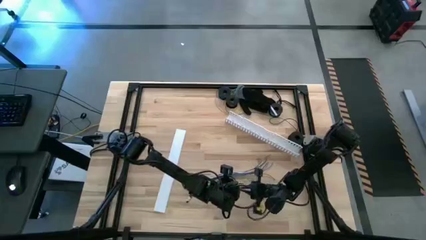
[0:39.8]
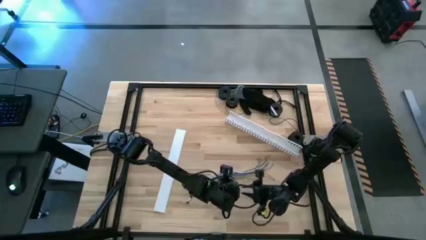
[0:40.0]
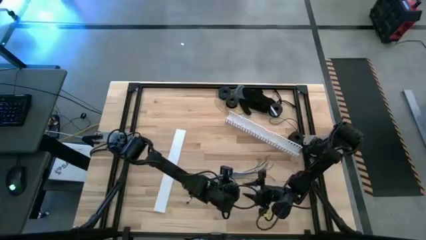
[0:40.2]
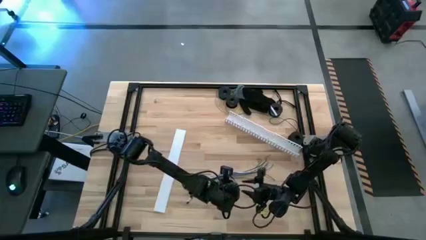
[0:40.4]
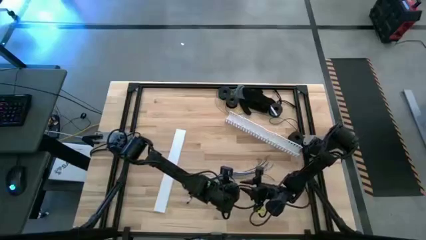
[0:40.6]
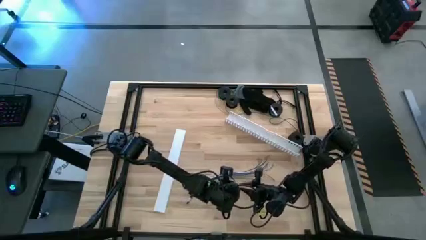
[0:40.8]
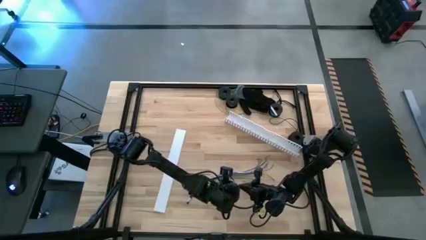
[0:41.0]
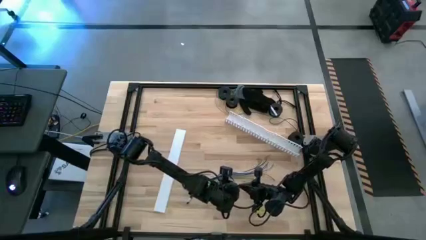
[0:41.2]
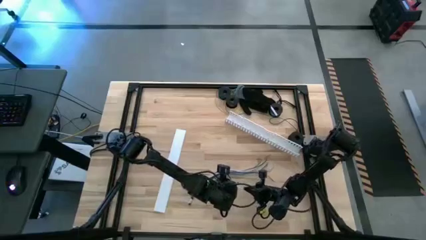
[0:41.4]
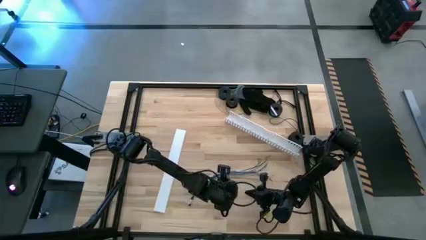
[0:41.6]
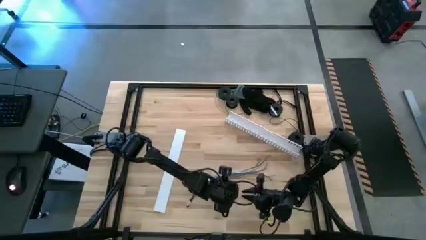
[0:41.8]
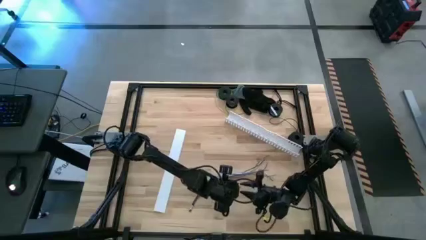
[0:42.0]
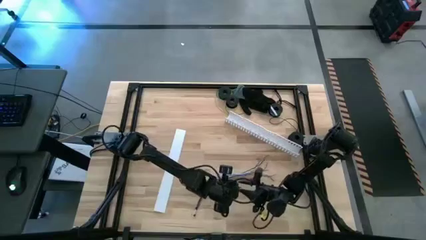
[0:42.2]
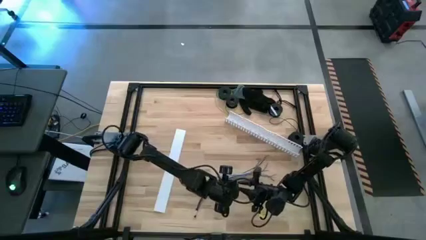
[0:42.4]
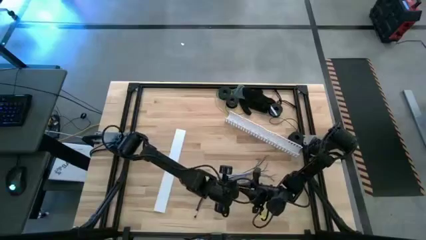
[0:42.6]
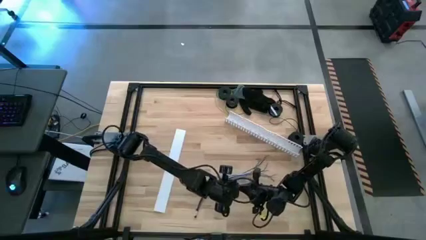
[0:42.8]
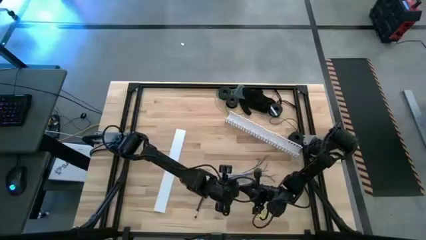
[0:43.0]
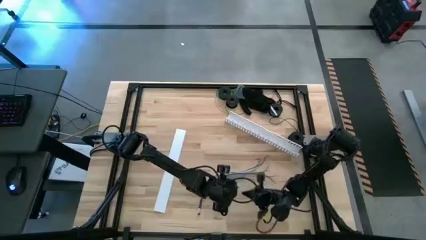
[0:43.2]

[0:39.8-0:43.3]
Task: Ziptie cables
Wrap the cable using zip tie

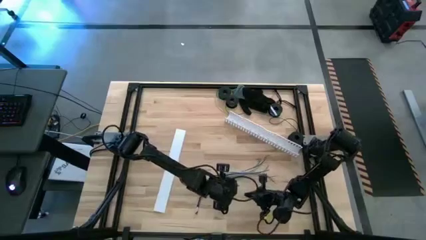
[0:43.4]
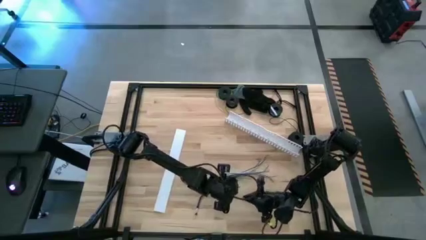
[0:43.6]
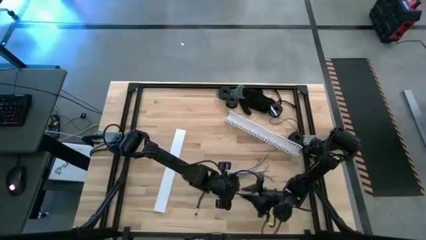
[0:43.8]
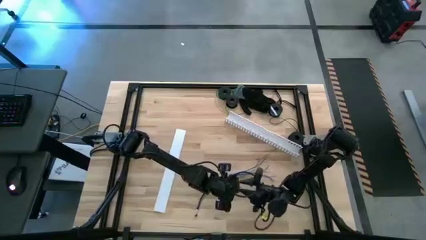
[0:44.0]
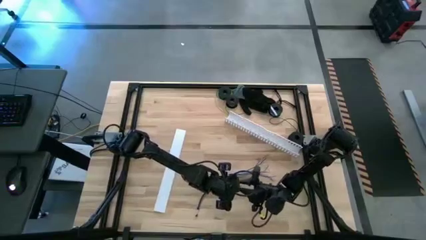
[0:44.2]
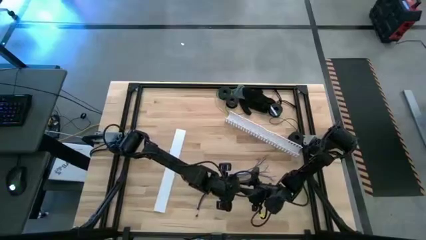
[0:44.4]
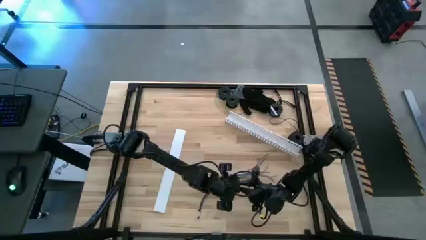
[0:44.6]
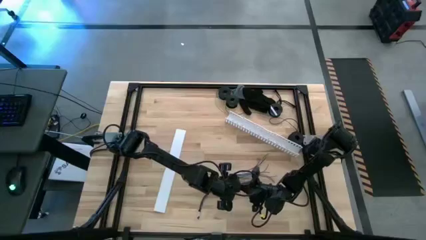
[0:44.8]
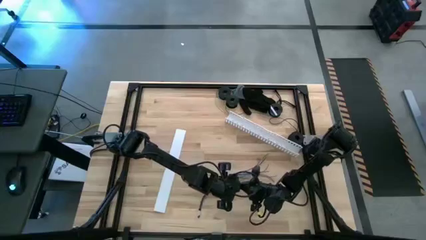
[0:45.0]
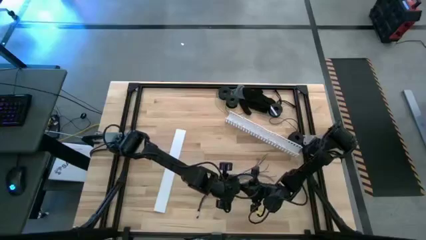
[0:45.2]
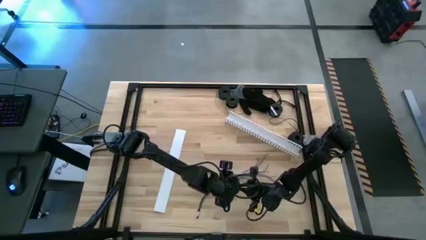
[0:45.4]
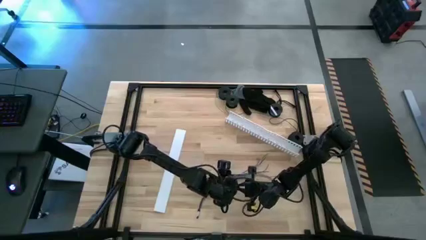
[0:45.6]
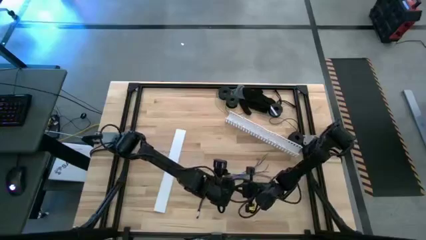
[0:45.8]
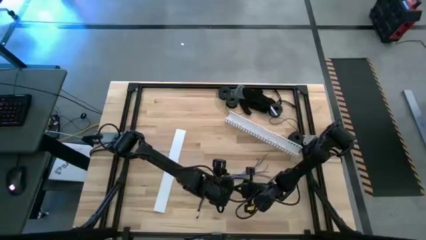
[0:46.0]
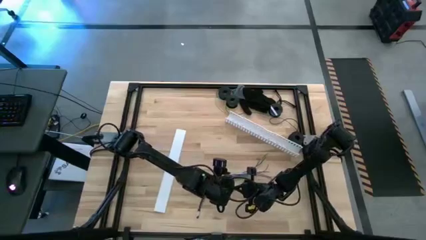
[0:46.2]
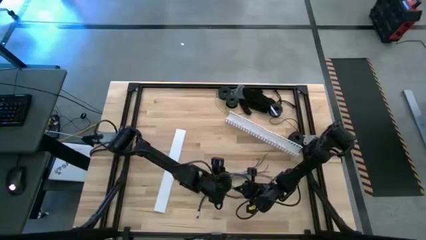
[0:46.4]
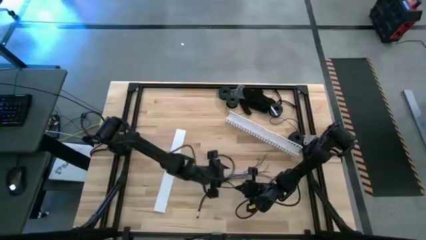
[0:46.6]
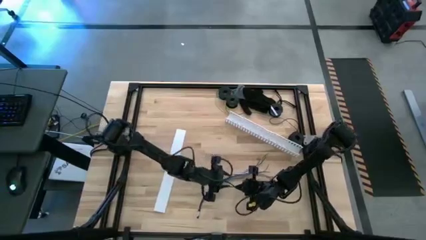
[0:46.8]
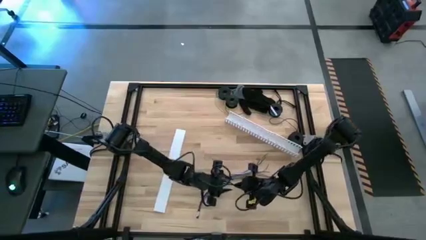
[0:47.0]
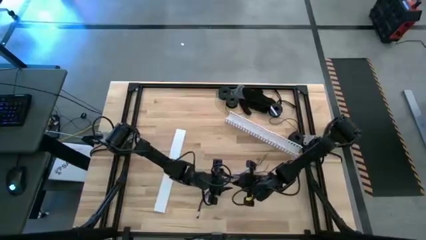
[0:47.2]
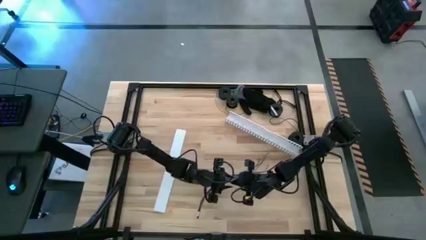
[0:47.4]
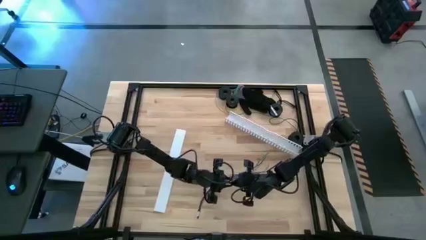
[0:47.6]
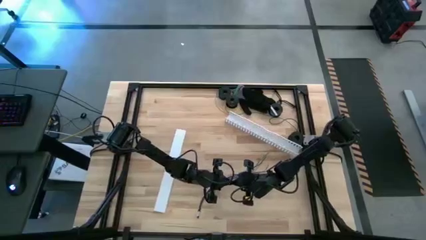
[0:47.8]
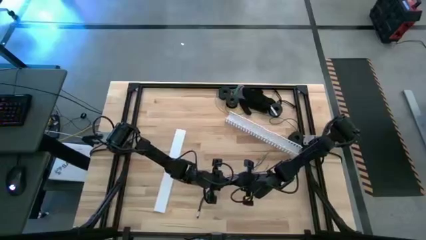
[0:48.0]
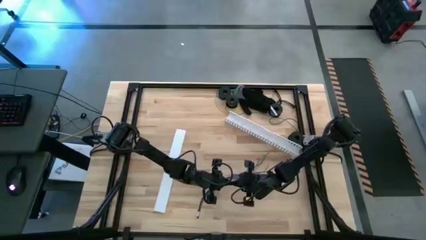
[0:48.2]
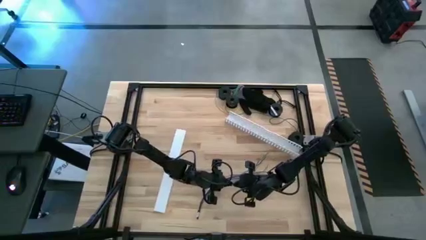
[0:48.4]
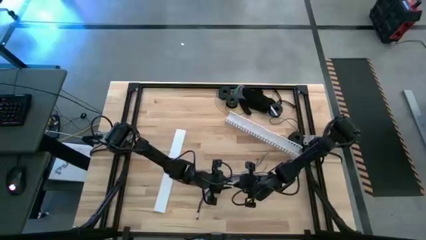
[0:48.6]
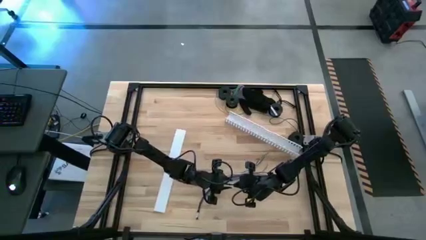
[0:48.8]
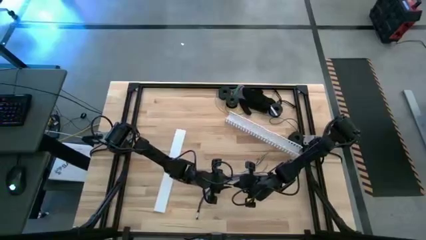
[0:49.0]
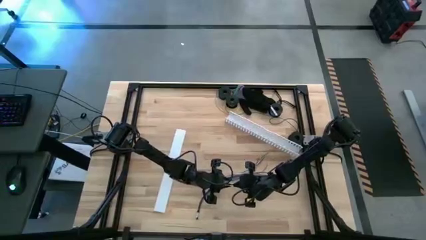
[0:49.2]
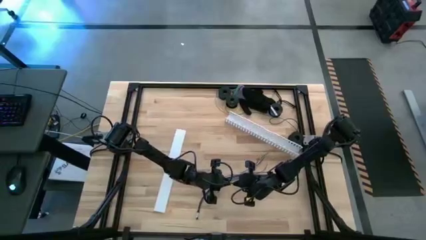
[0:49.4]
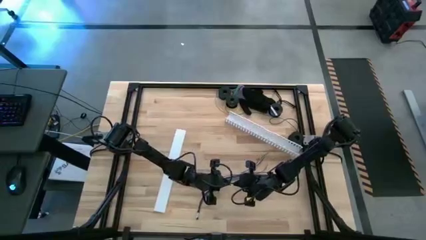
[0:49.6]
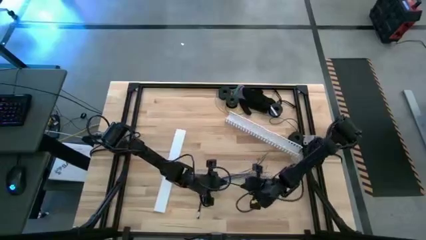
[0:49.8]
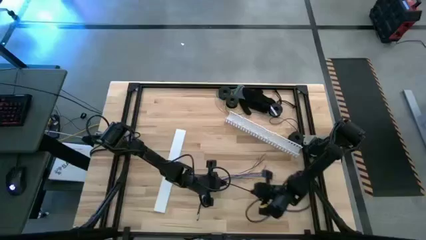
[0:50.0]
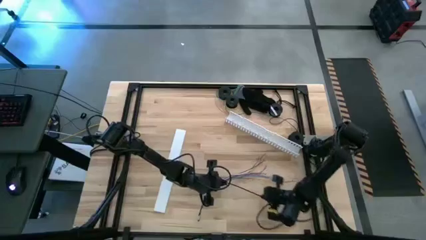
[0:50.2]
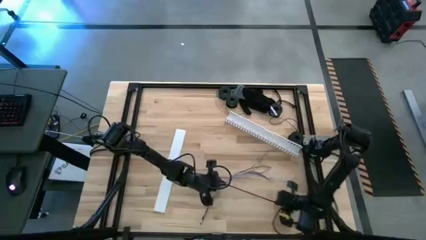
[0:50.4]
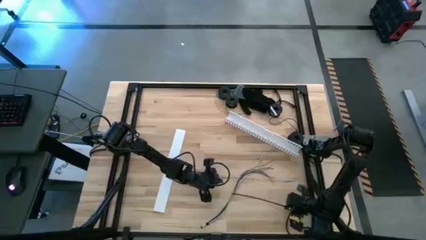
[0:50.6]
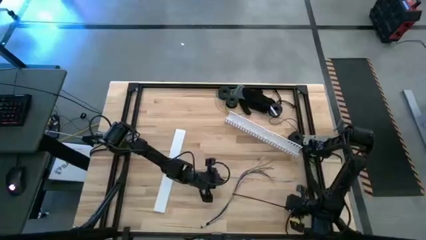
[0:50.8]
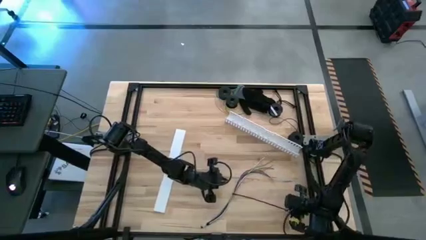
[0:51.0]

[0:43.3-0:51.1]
Wrap the cable wires with zip tie

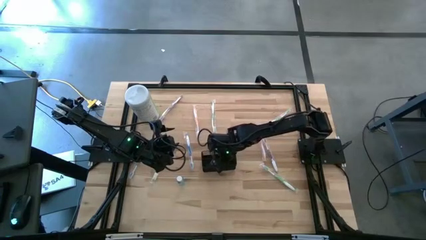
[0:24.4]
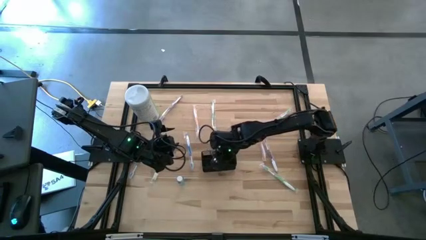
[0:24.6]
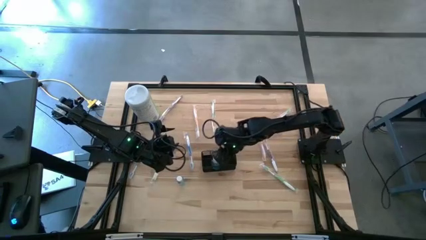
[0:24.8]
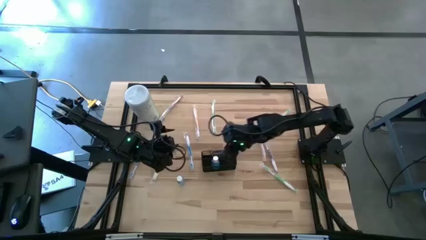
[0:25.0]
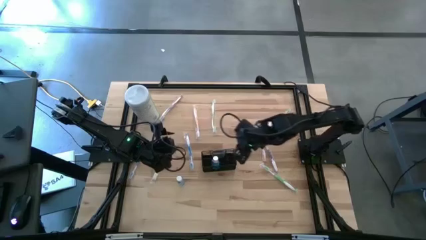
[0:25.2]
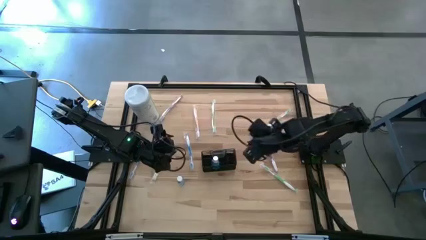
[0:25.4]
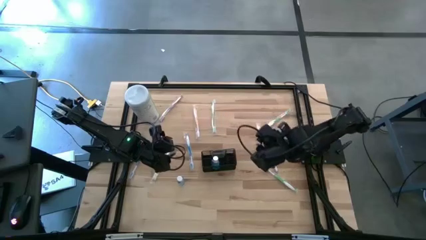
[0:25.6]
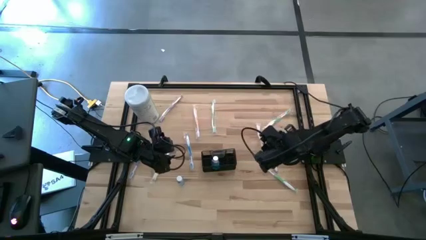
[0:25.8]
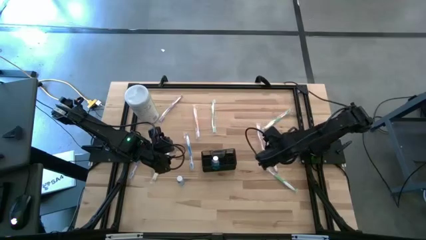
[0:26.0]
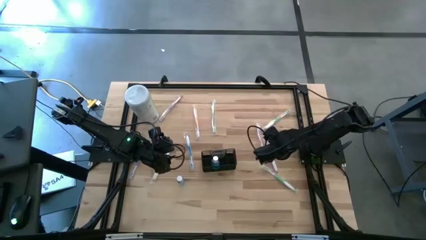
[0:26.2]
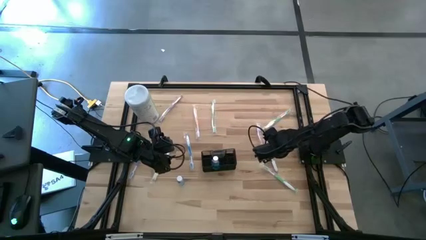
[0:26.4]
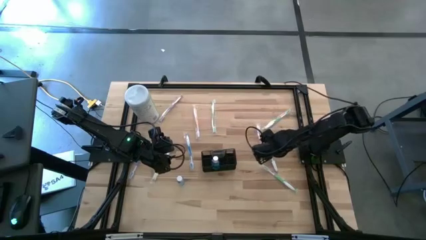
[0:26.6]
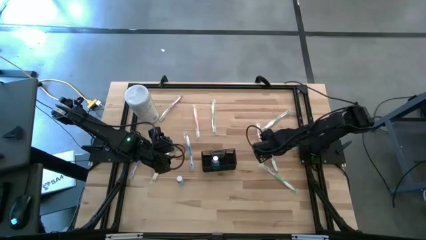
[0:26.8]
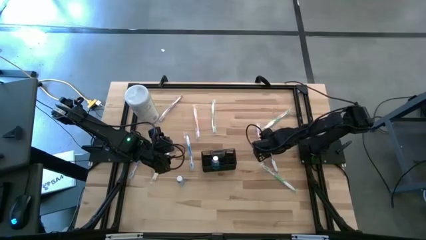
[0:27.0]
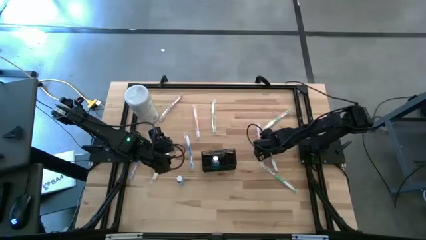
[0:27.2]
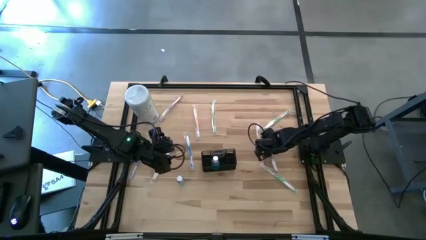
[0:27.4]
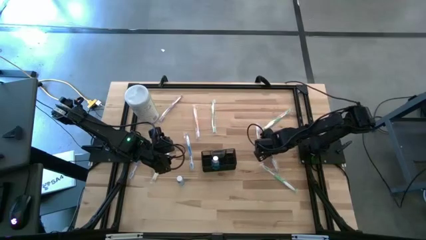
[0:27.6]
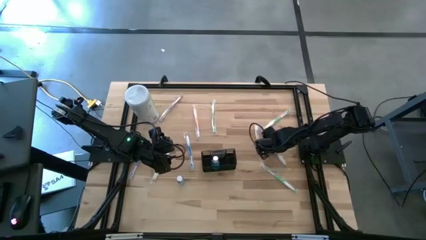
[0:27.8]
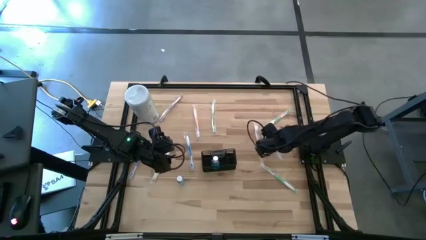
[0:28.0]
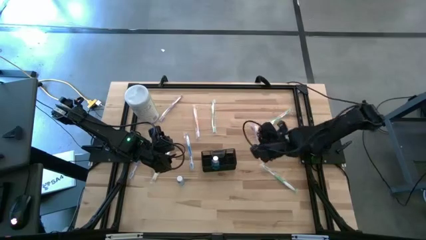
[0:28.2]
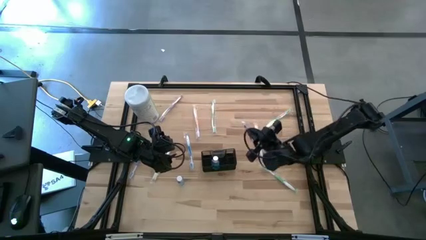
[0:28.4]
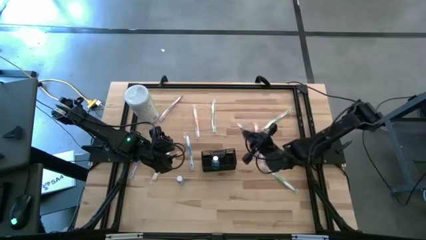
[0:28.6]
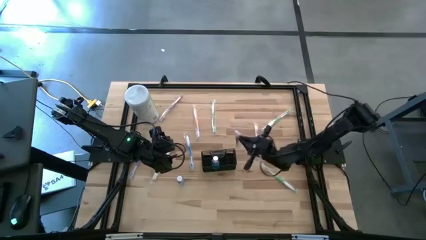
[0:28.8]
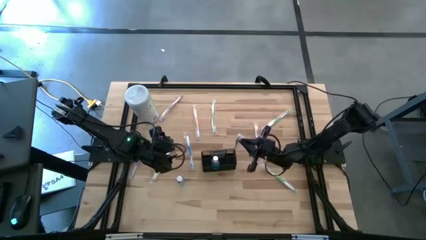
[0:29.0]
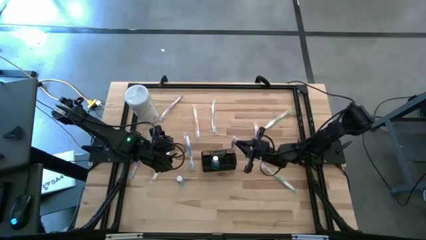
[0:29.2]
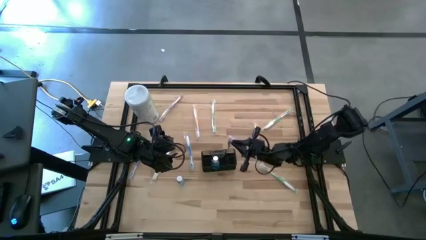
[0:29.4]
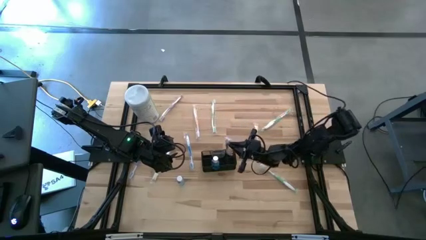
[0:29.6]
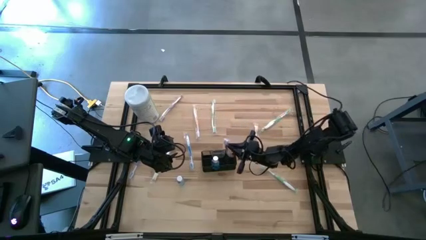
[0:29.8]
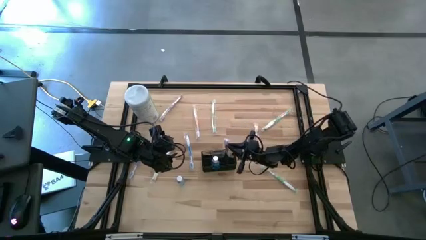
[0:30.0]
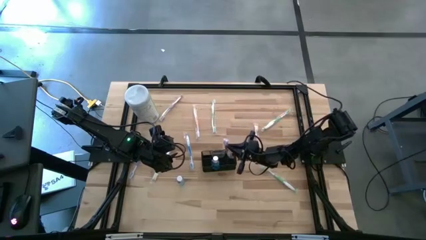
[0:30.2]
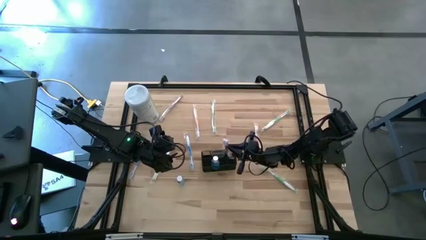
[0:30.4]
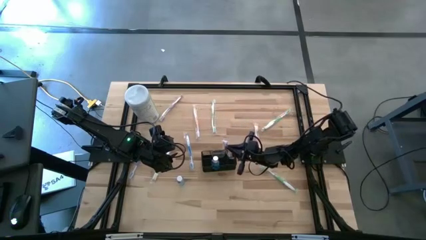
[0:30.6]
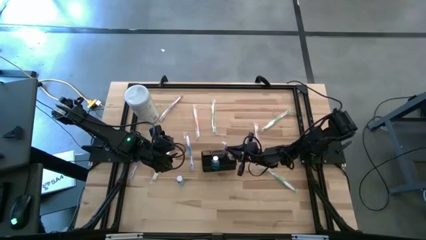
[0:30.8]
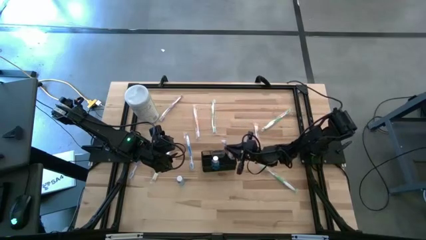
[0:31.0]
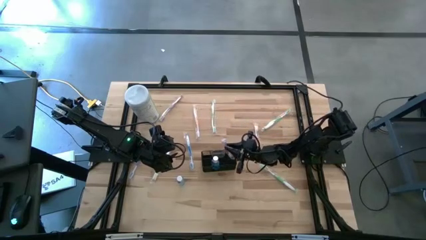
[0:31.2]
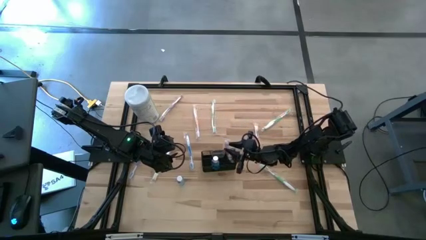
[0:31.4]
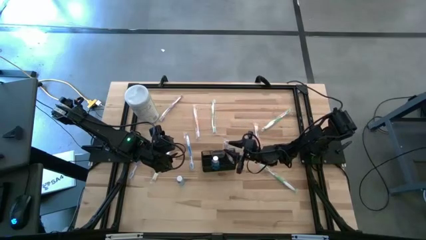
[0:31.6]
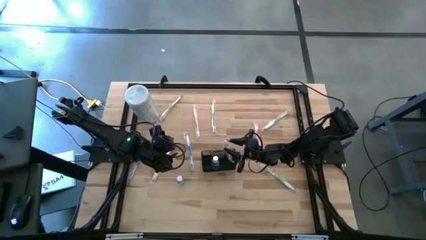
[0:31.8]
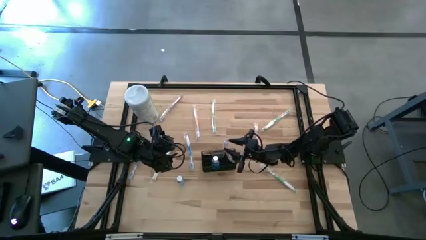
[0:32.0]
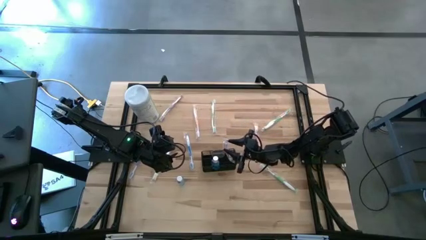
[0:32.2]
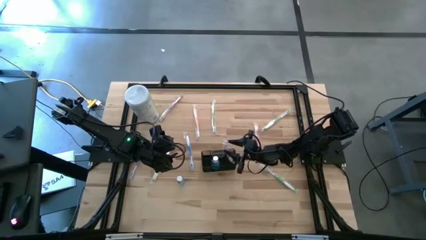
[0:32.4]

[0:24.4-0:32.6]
Task: Pick & Place toothbrushing station
Put the right purple toothbrush into the black wire organizer
